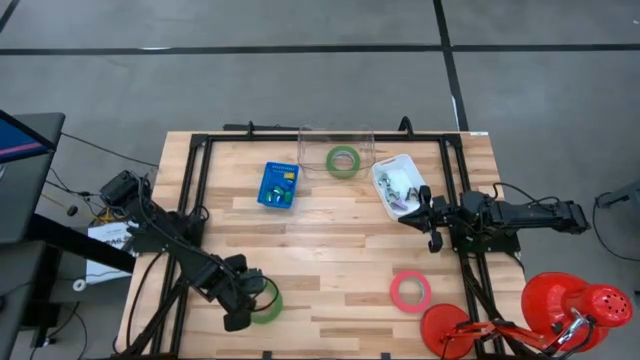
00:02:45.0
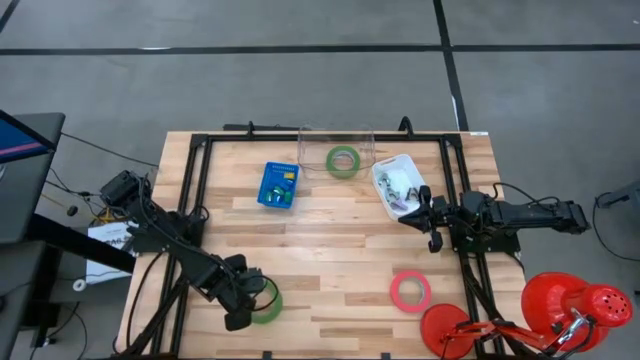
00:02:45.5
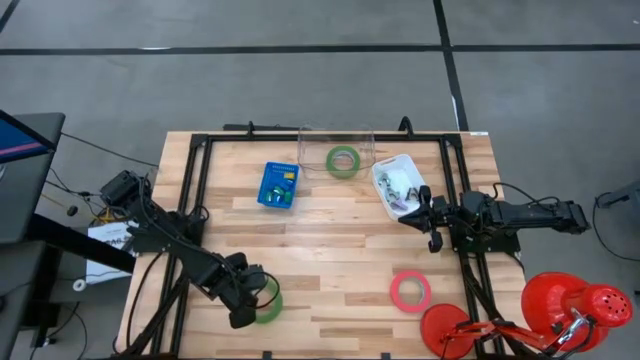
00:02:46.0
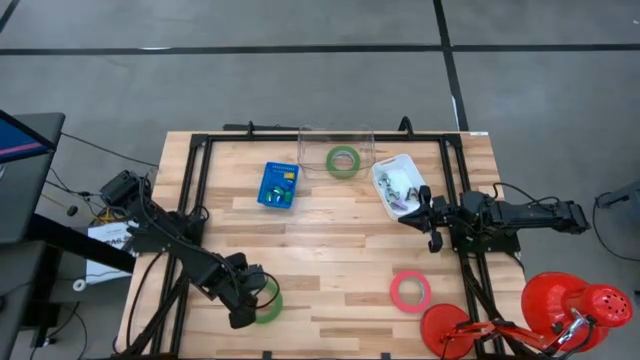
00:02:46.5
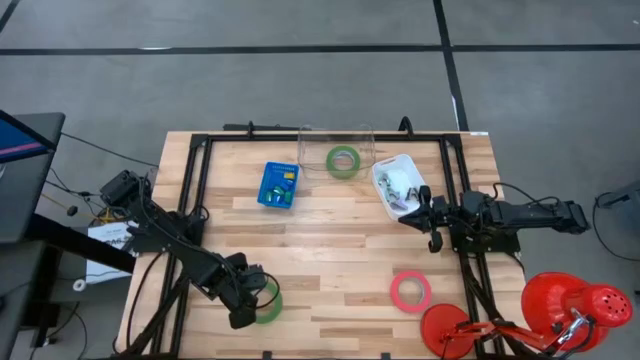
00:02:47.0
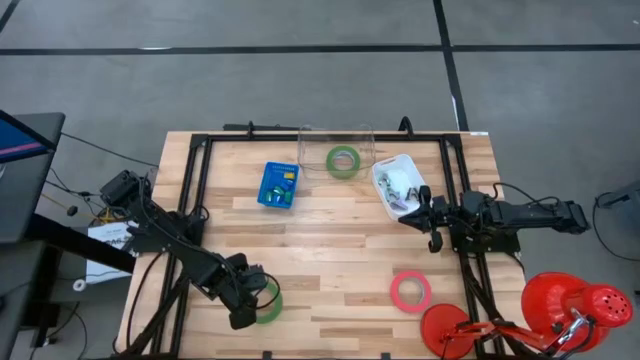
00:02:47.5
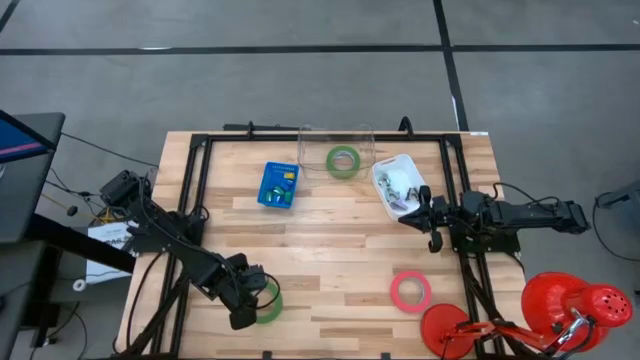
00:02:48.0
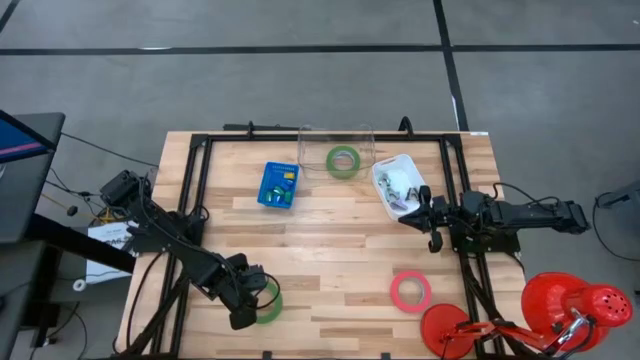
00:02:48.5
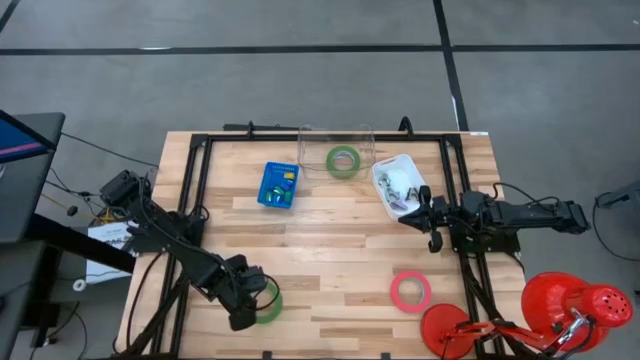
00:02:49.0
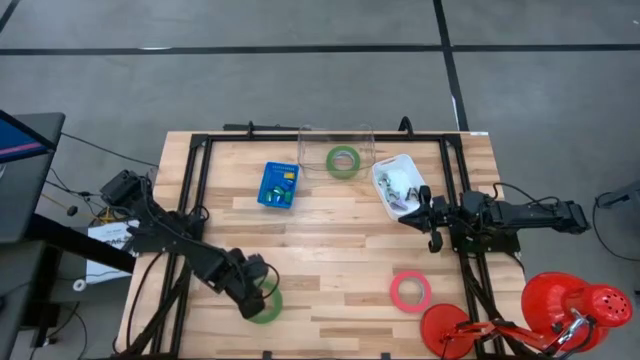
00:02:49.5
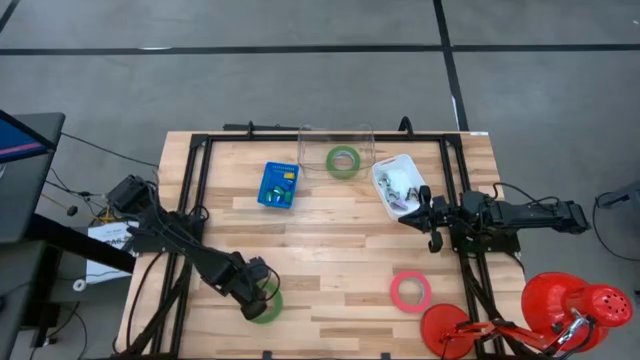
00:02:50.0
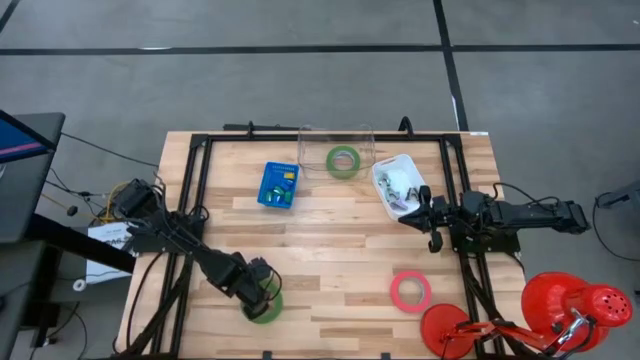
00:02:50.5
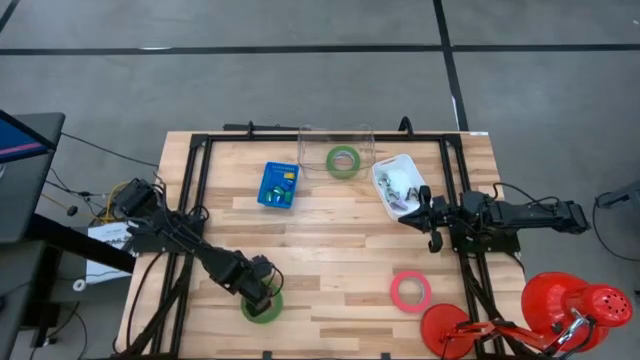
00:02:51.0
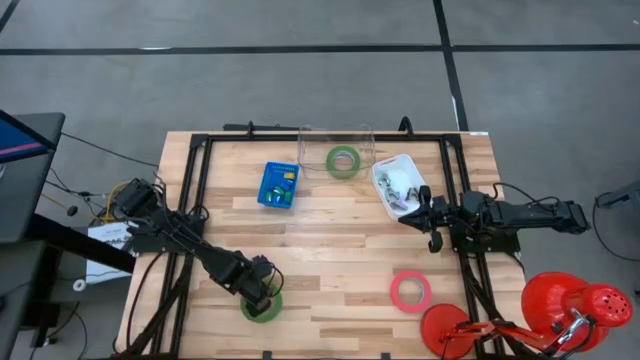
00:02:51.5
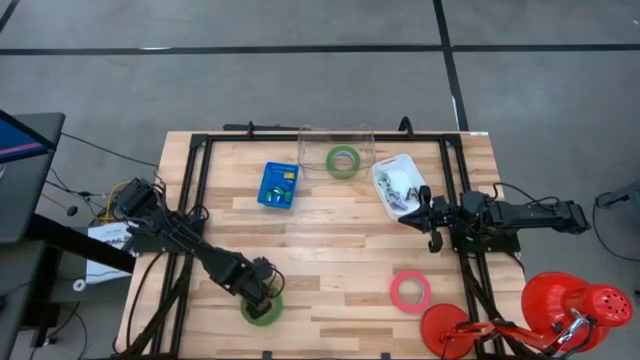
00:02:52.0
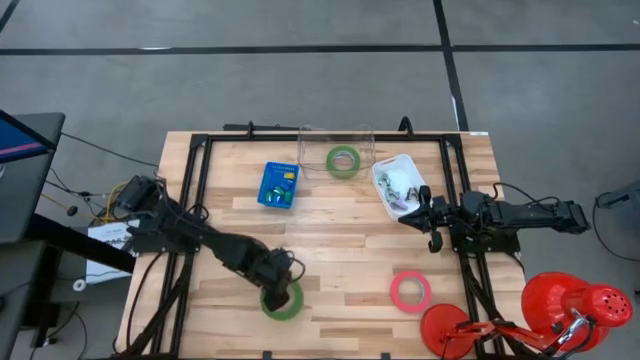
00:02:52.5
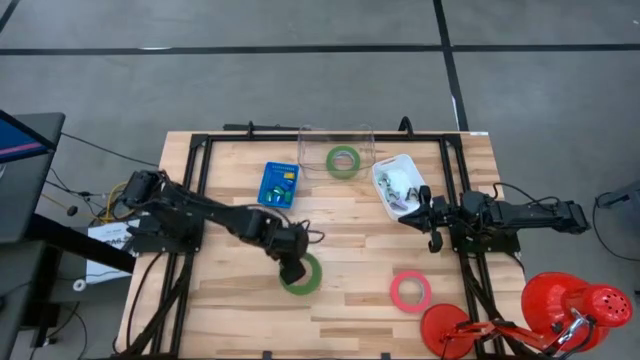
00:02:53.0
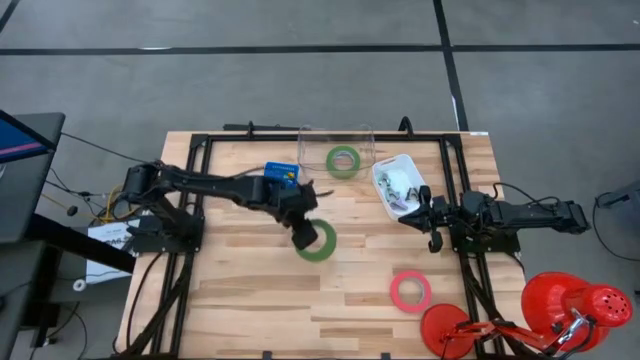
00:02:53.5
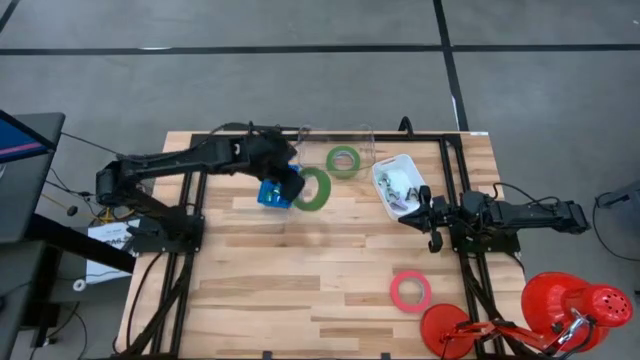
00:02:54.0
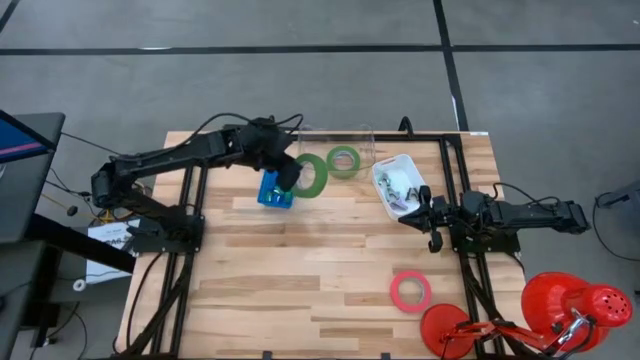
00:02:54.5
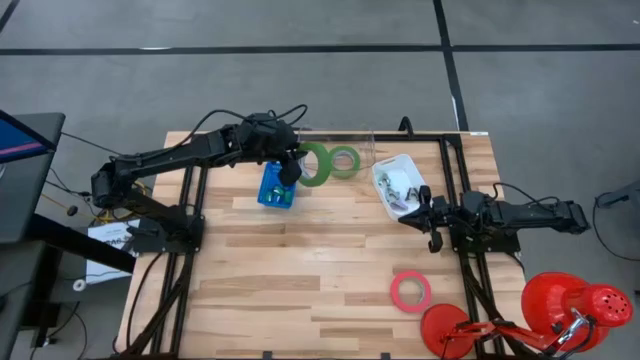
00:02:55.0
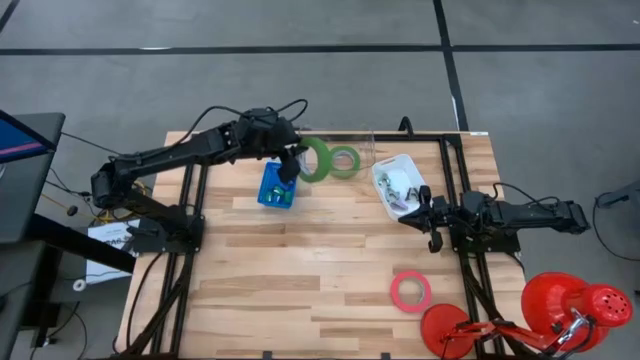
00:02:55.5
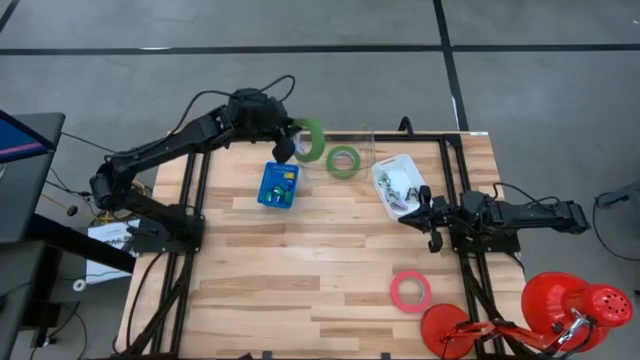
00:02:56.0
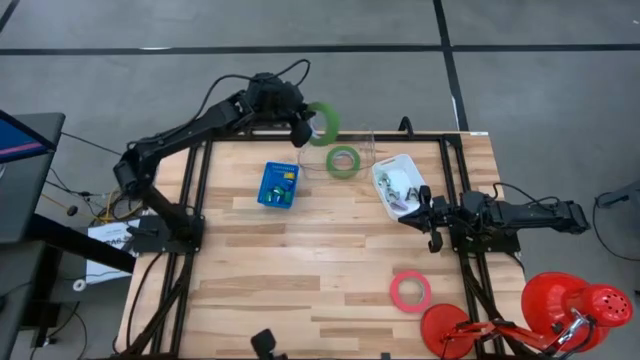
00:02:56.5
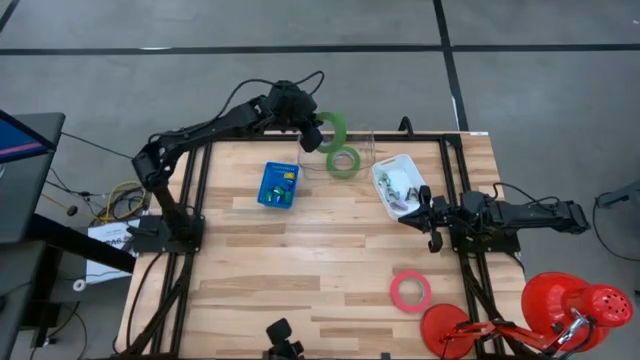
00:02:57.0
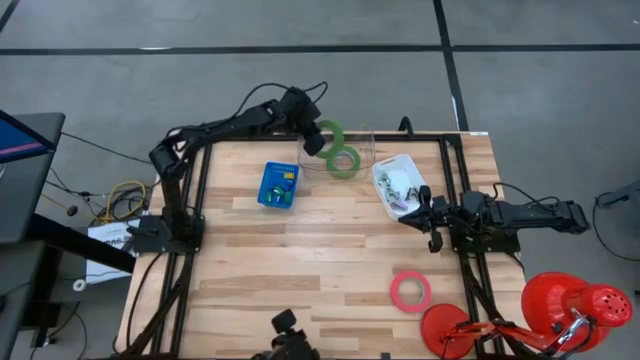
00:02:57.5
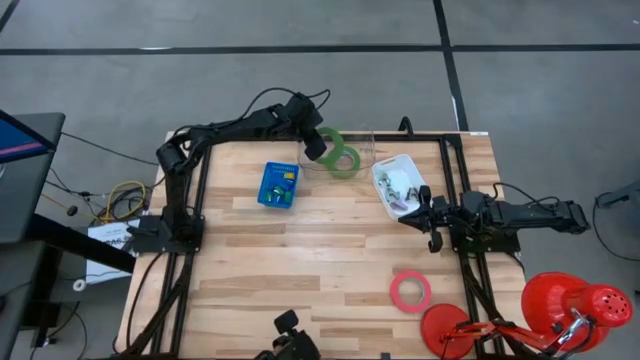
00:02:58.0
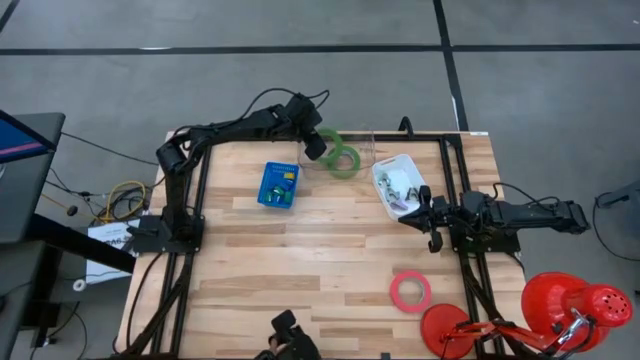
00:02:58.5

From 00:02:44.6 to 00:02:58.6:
Task: Pick and place Stapler, Stapler remover, tape
Put the green tape into the transparent bin

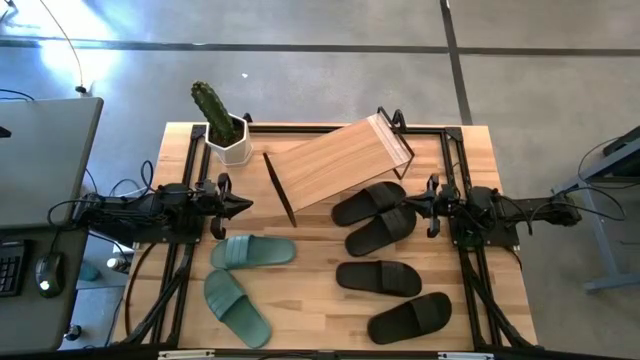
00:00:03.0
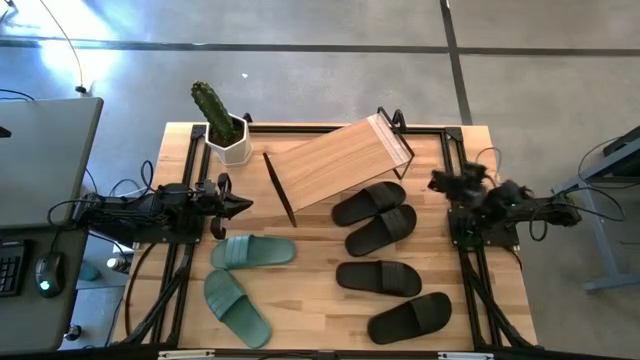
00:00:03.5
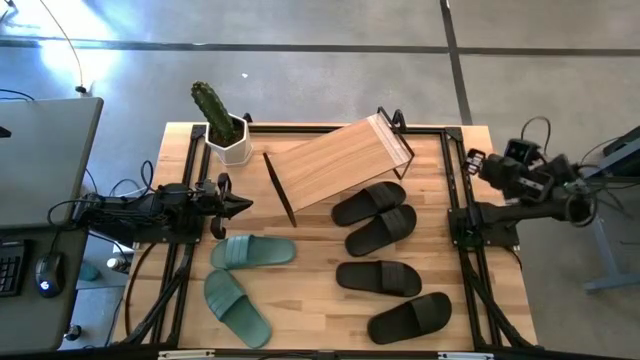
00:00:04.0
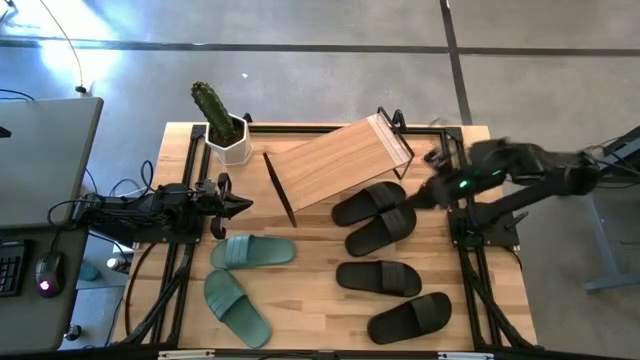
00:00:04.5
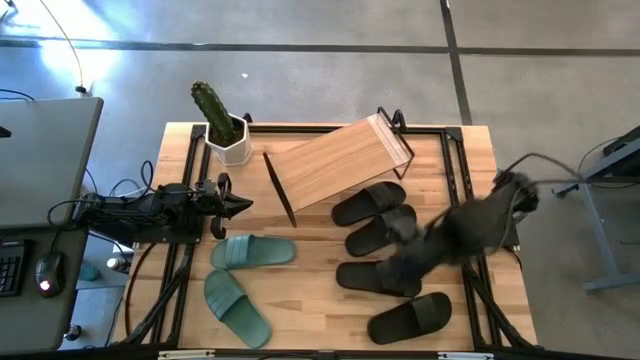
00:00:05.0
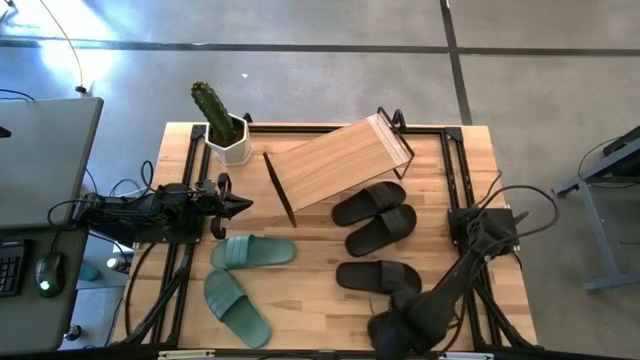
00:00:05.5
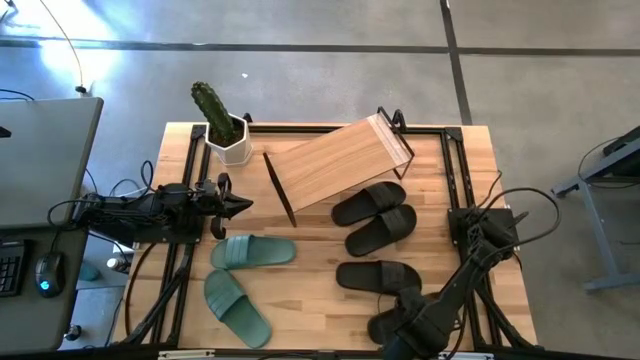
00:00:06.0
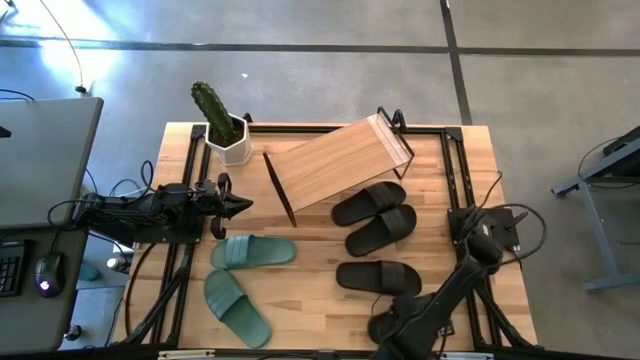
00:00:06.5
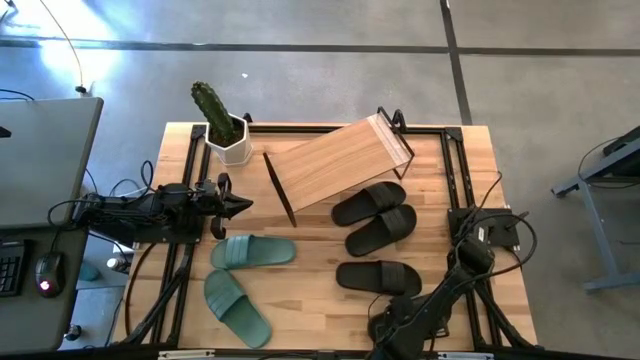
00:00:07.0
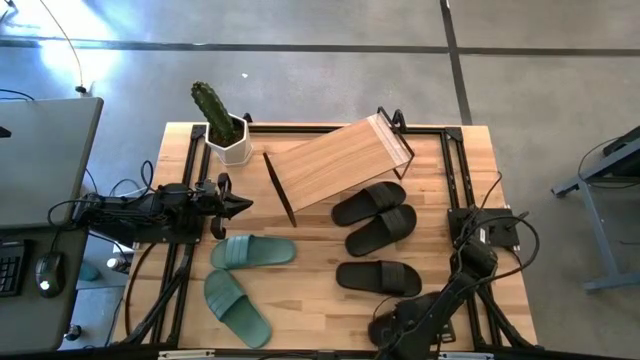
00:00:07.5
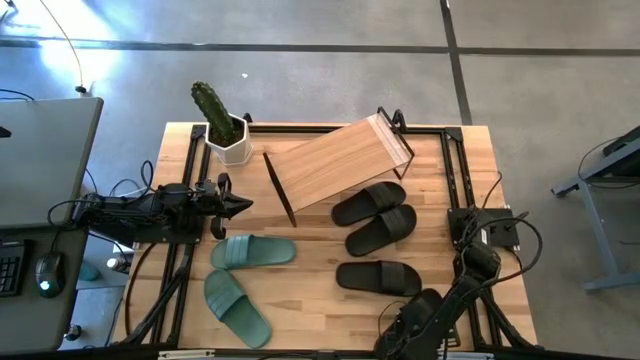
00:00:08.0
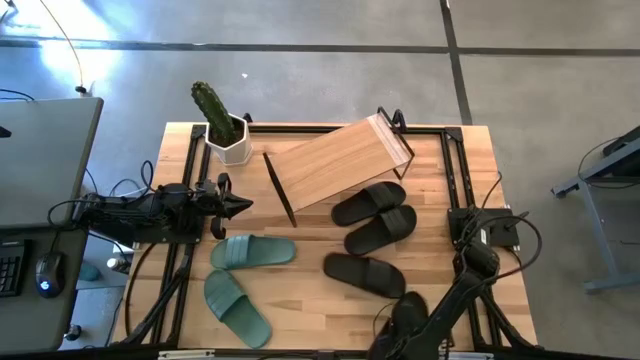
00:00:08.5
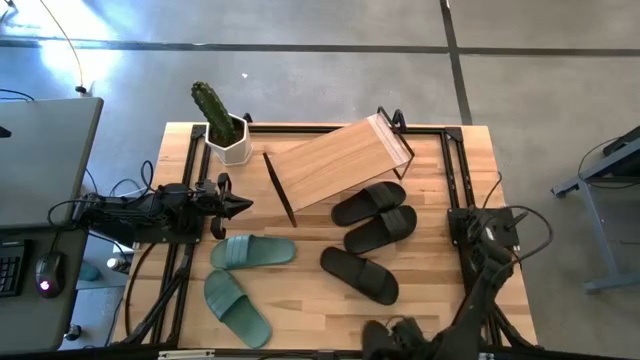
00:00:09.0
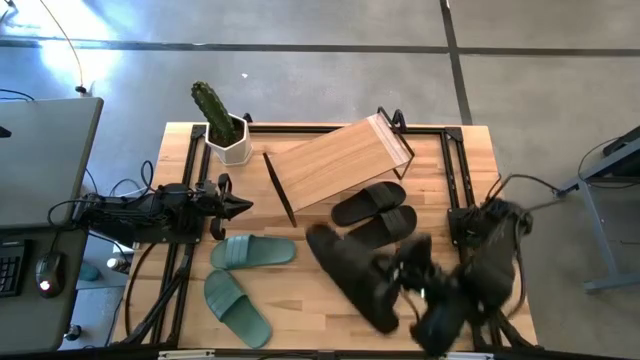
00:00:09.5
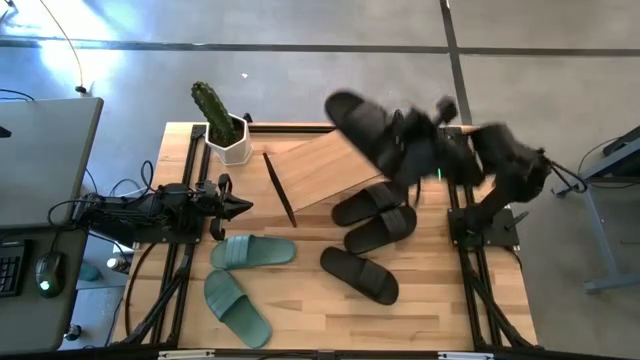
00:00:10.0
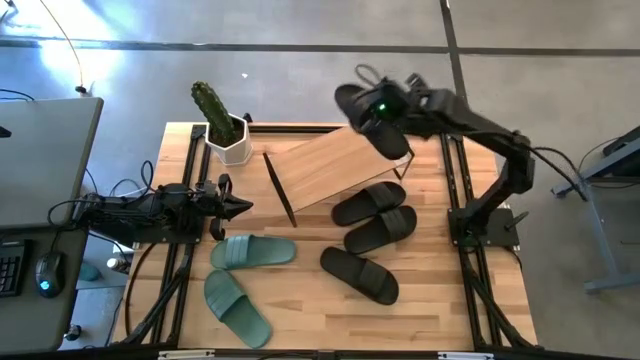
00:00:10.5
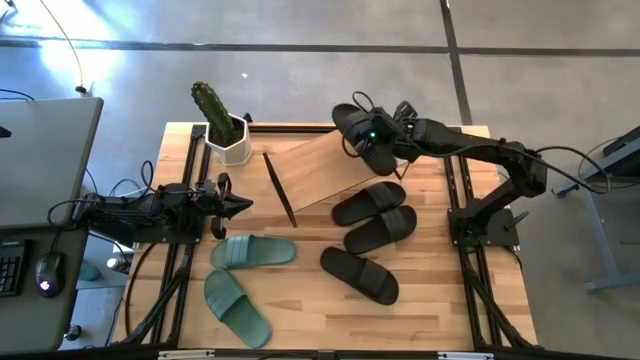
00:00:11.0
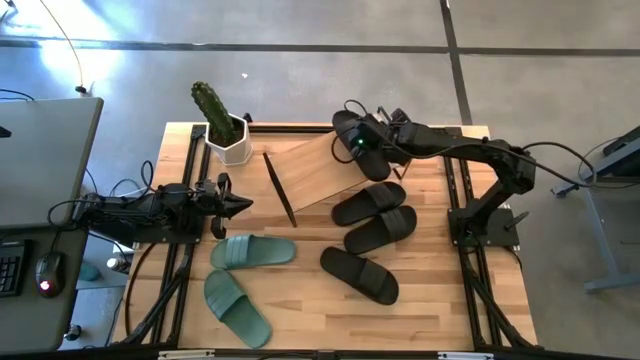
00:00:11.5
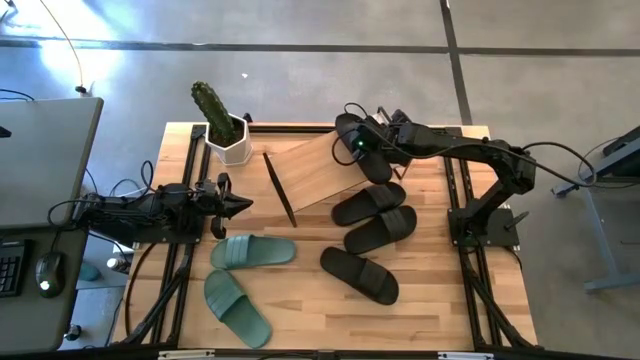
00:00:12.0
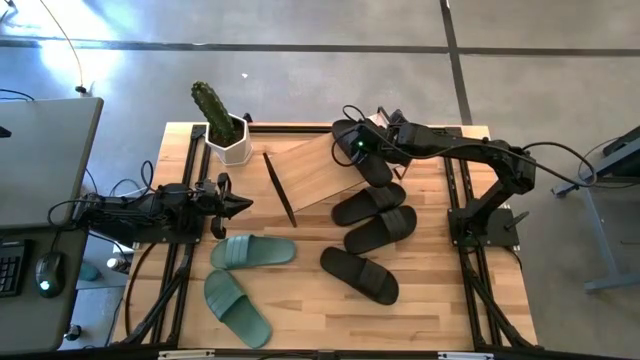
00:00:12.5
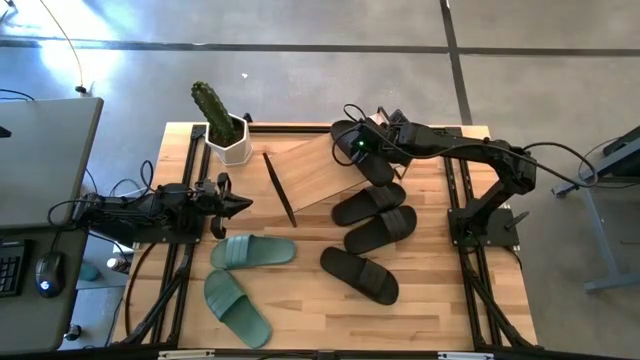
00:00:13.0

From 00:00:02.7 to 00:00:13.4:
Task: Pick and place slides into the shelf
Put the black slipper on the shelf
